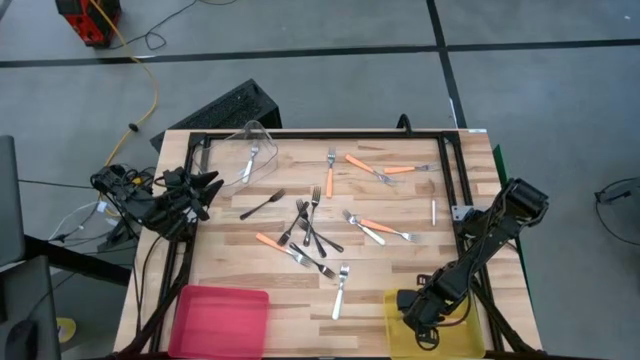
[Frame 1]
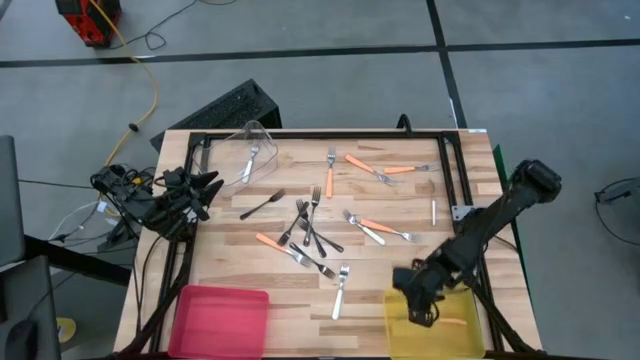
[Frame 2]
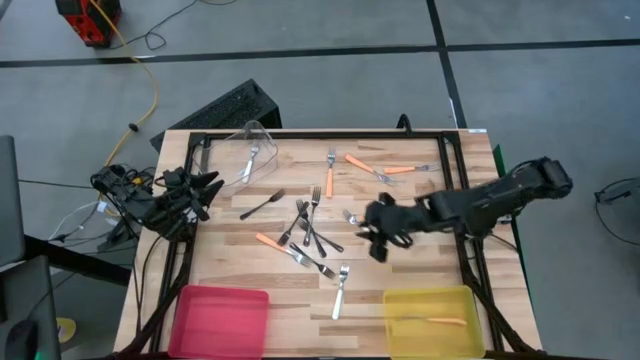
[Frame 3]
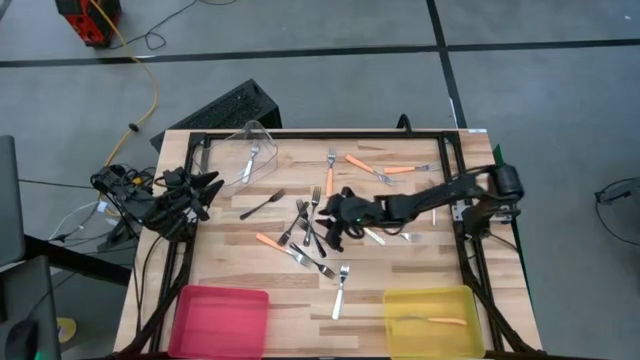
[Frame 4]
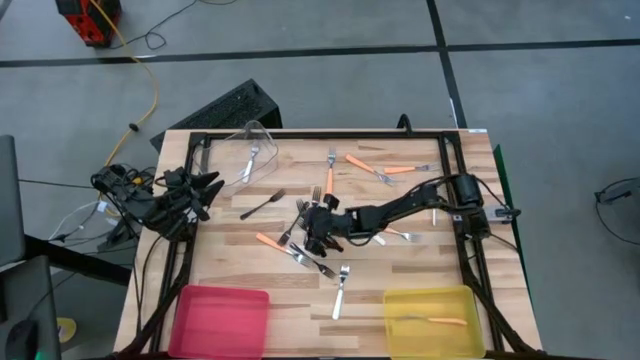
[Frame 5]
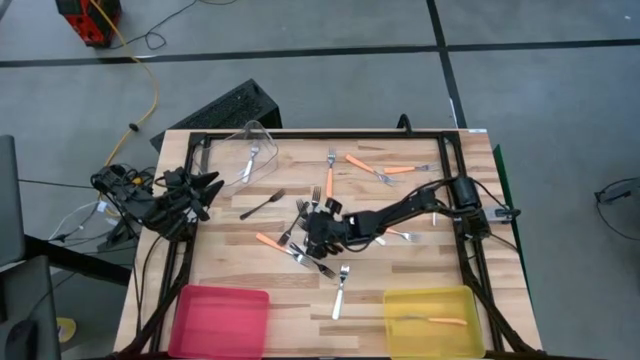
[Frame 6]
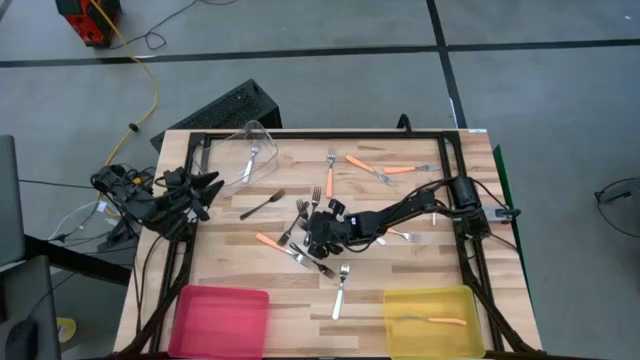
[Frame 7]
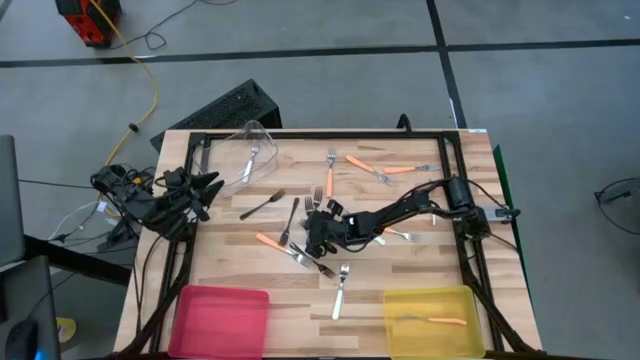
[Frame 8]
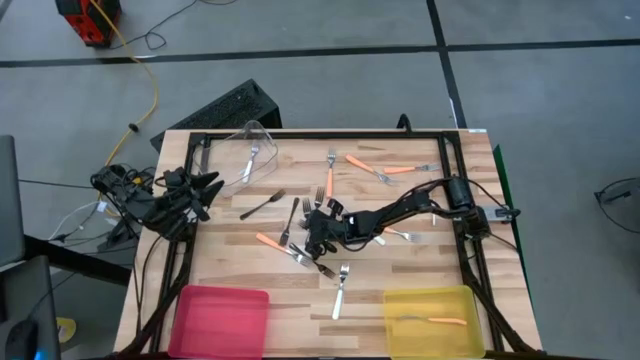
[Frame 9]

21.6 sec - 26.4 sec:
Task: Sort silverware by color (type)
Put the black fork into the red bin

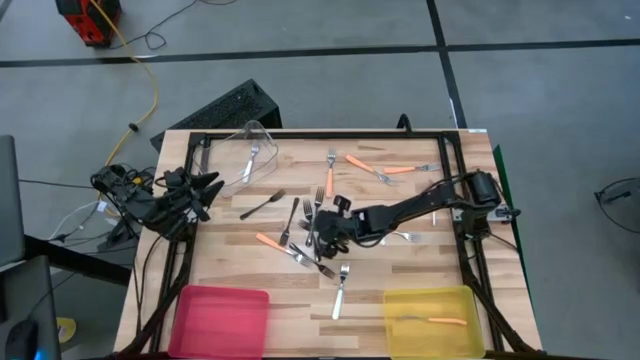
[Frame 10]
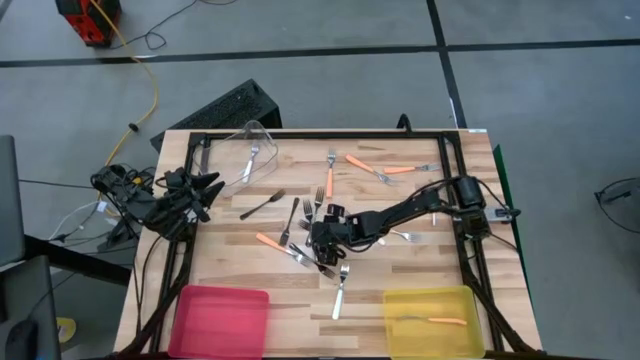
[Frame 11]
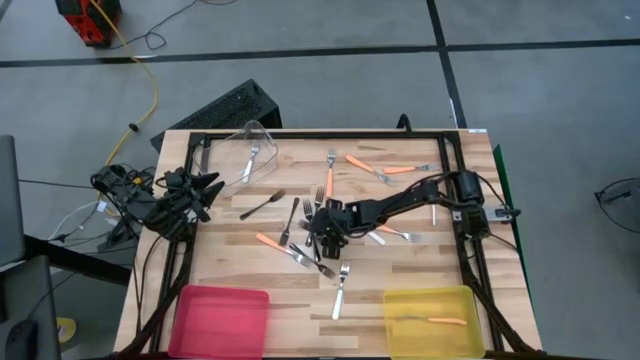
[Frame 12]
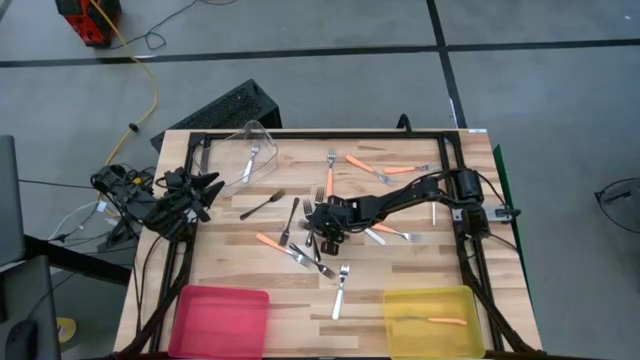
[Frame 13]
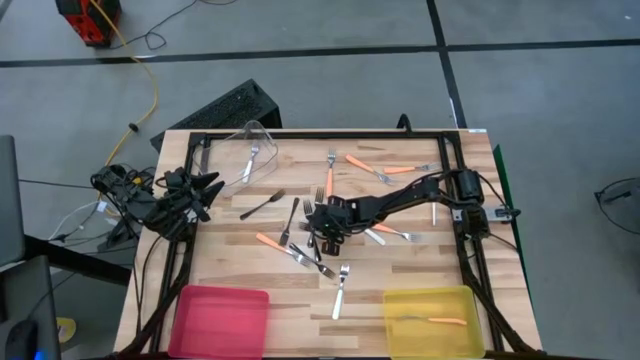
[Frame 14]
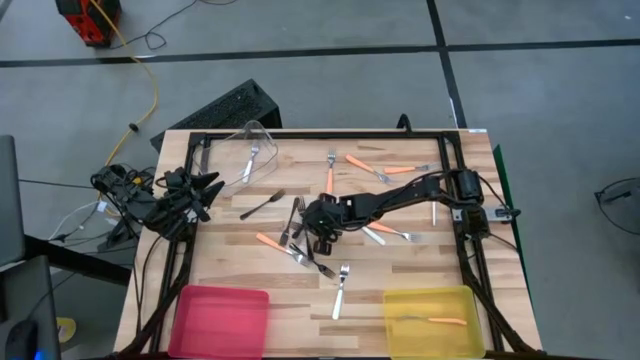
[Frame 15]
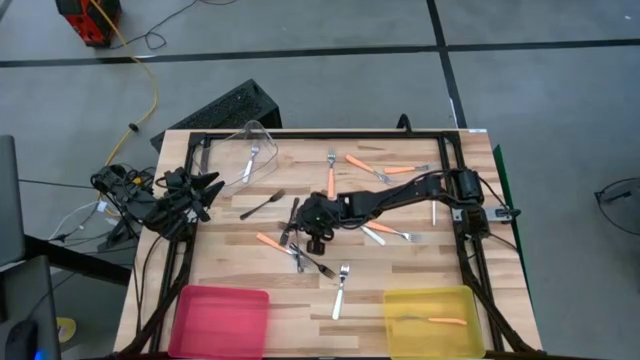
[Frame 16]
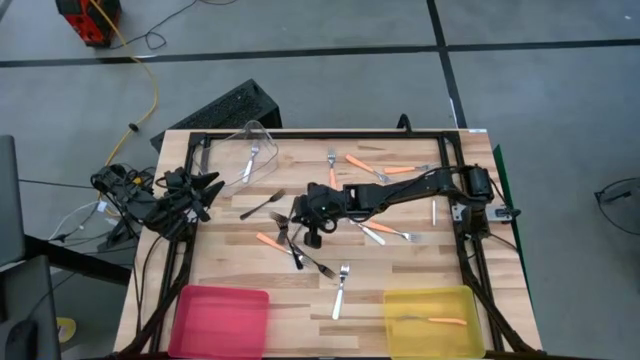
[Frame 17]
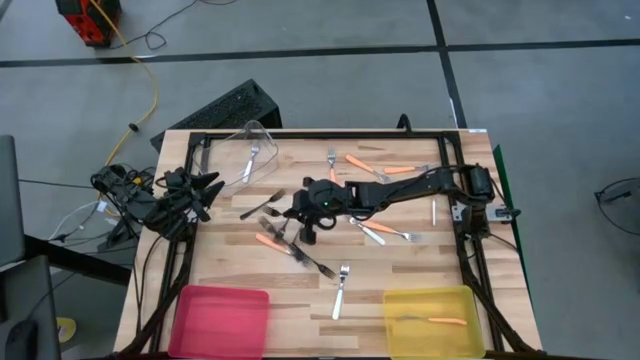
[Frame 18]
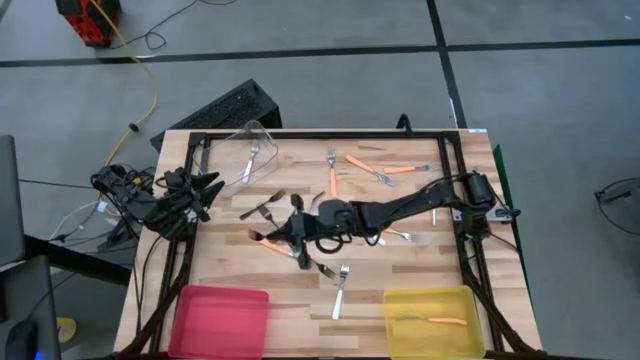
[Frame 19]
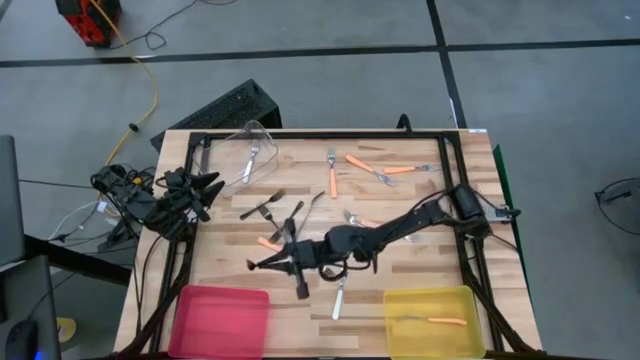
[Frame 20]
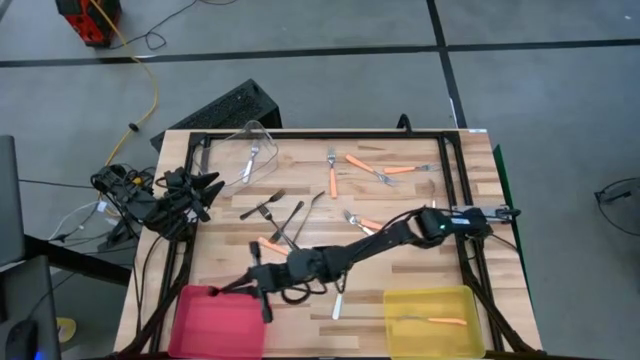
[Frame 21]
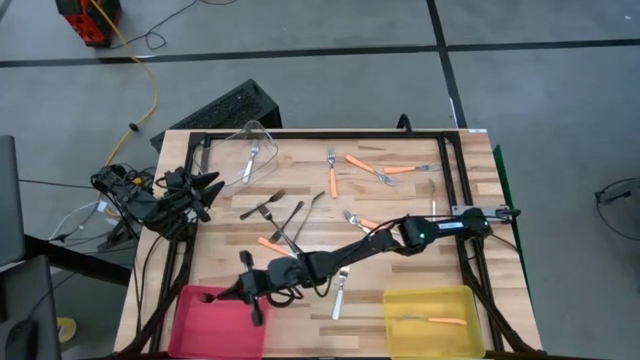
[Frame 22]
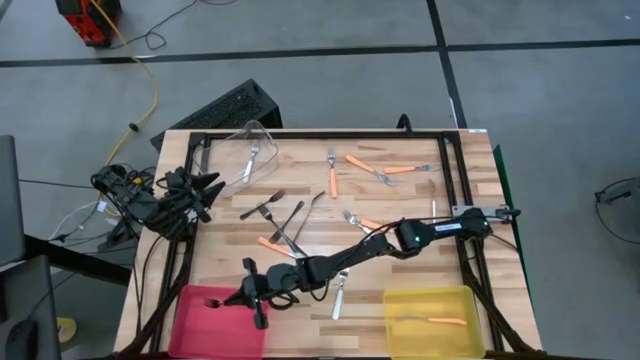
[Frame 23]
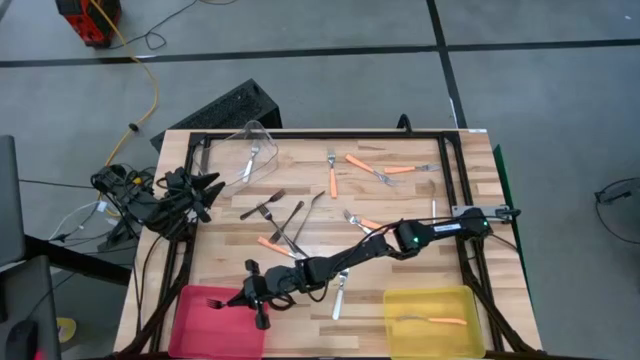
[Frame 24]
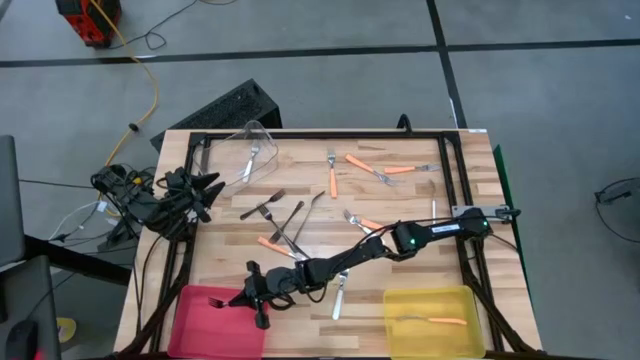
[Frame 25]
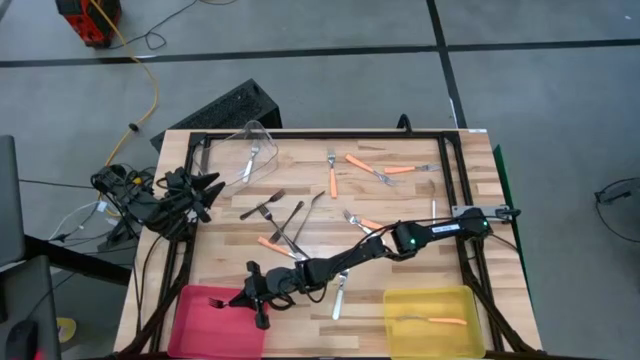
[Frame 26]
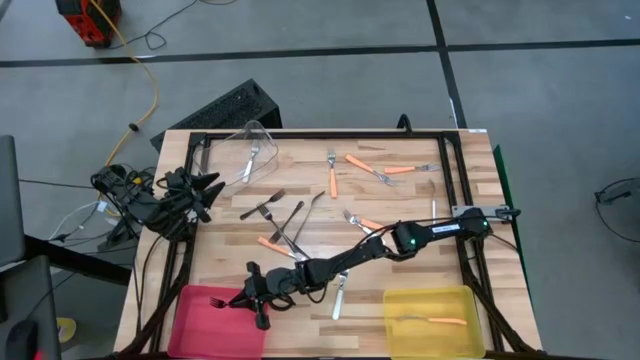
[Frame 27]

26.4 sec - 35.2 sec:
Put the black fork into the red bin

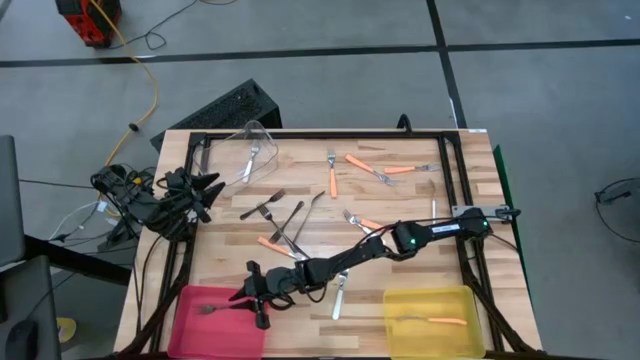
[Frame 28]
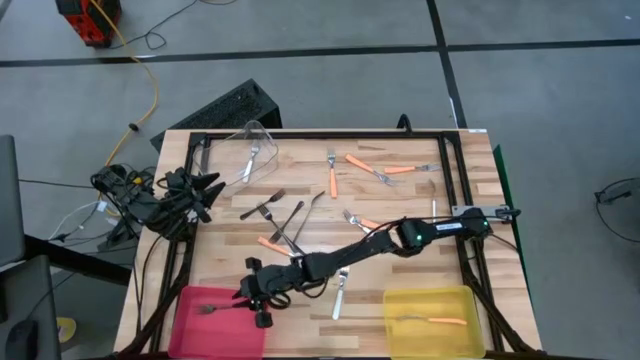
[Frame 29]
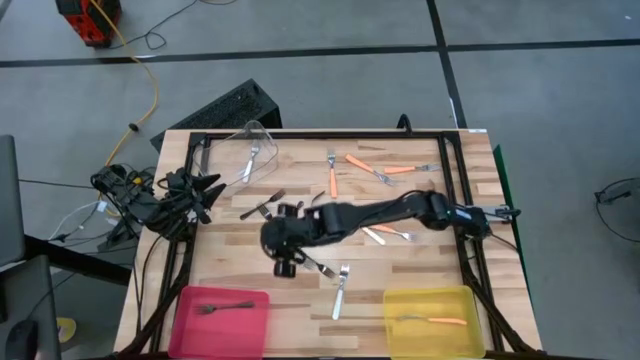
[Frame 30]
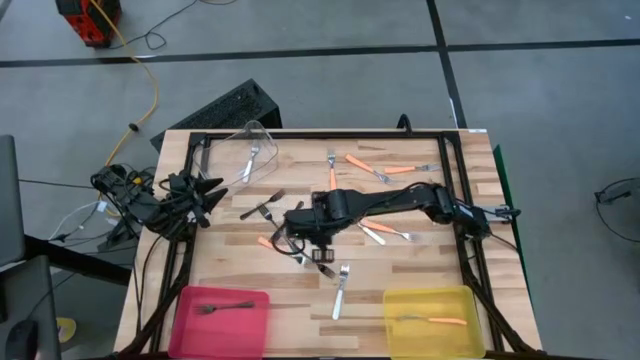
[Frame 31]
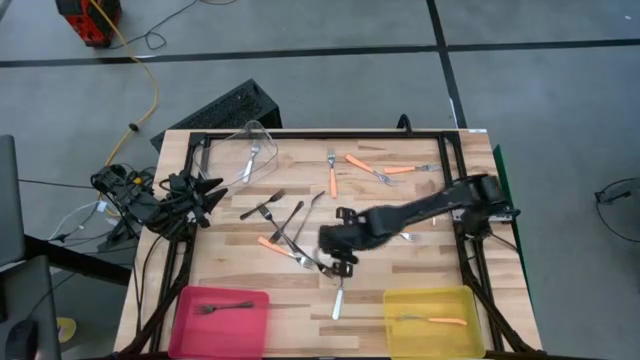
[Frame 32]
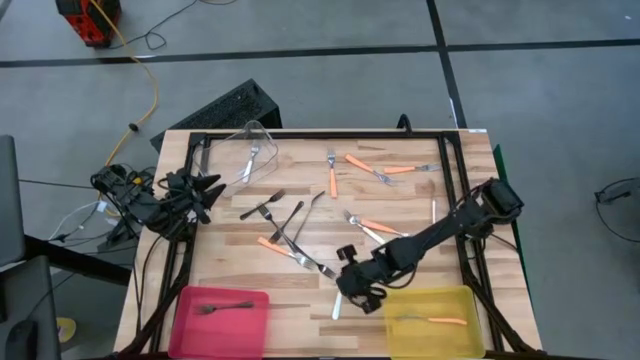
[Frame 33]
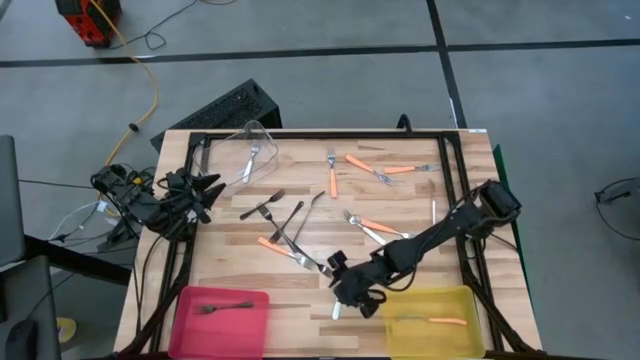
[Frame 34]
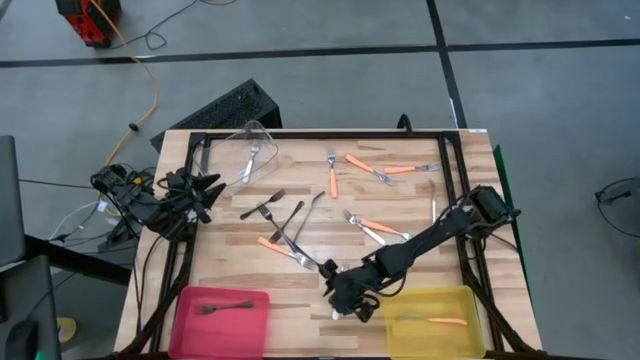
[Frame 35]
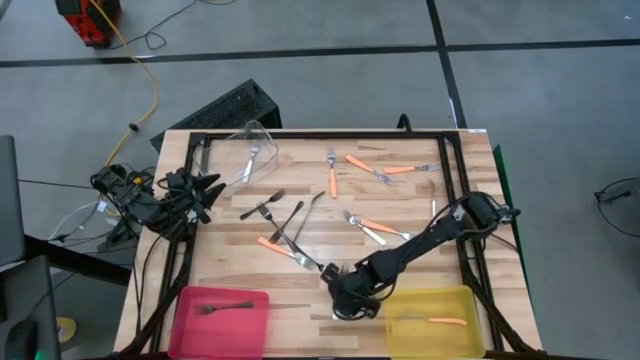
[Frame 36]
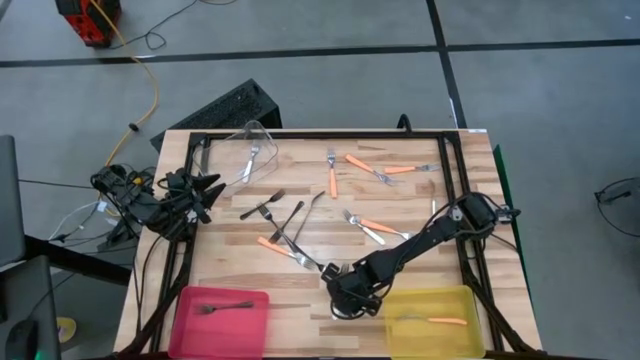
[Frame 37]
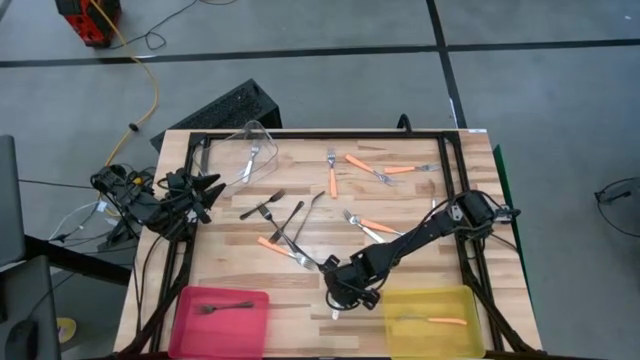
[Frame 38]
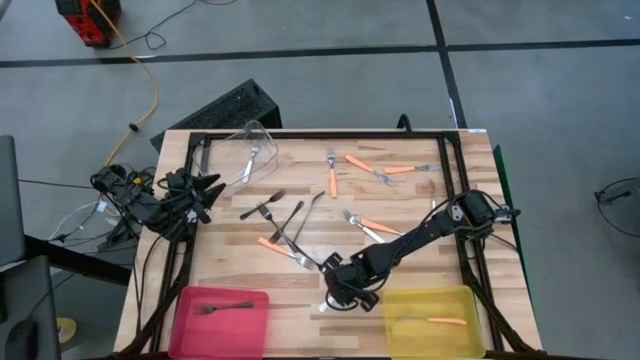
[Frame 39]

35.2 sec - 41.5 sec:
Put the white fork into the transparent bin

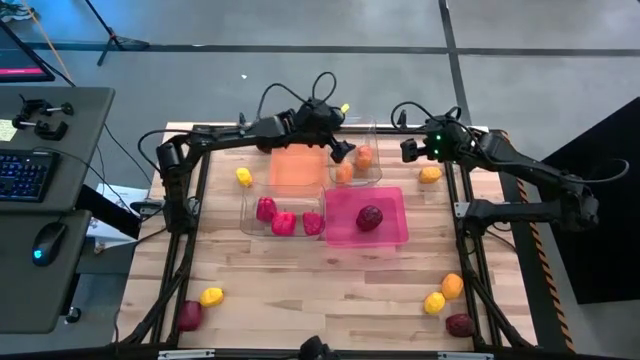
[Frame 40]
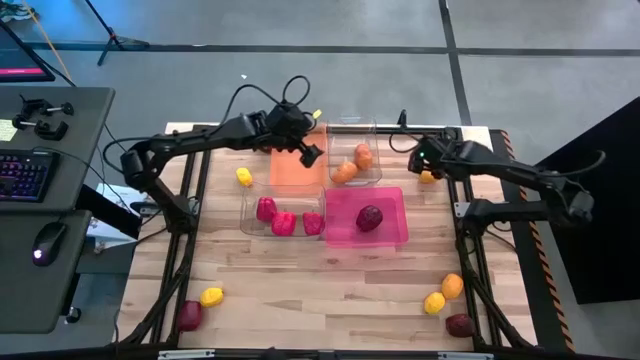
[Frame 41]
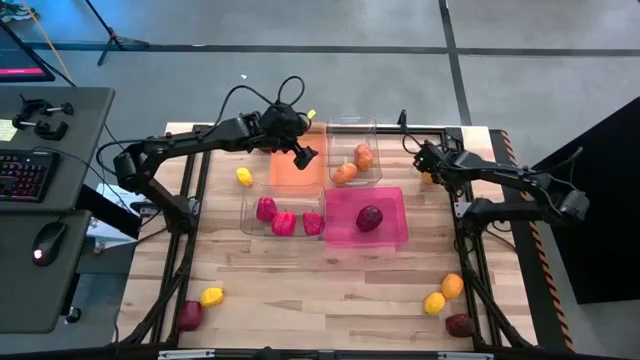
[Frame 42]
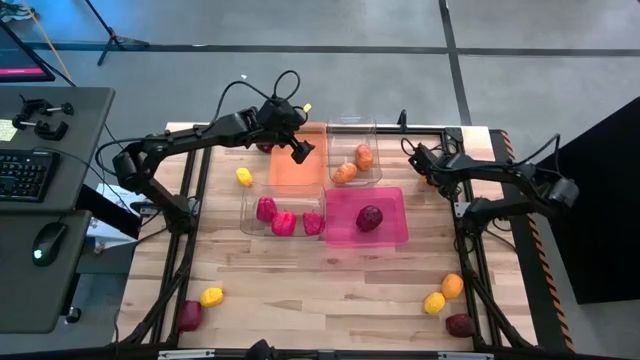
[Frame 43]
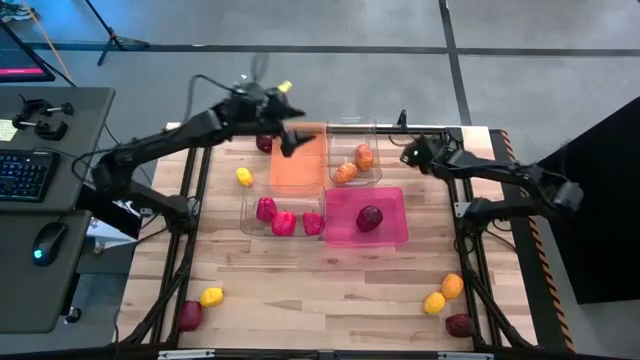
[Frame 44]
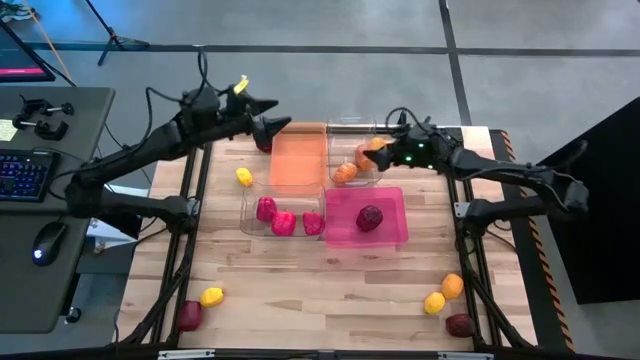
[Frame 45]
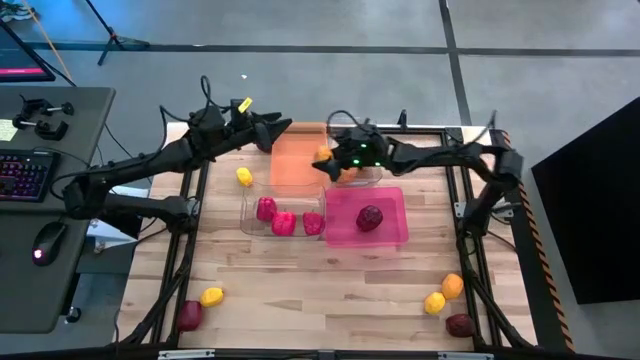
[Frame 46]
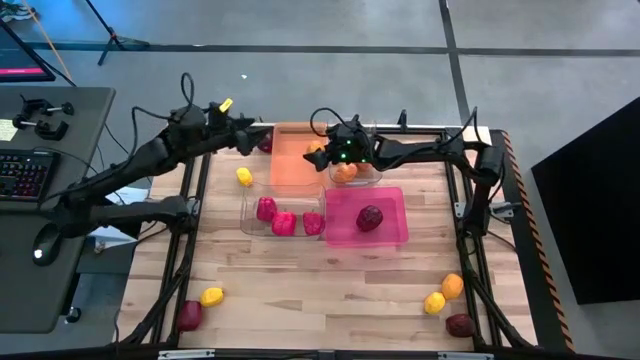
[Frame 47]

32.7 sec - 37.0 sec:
Task: Sort produce into baskets
Put the lemon into the orange bin
